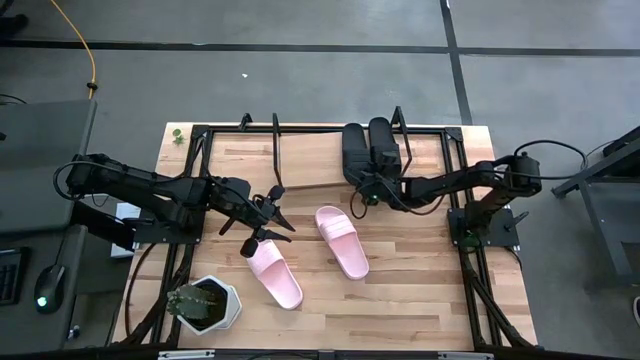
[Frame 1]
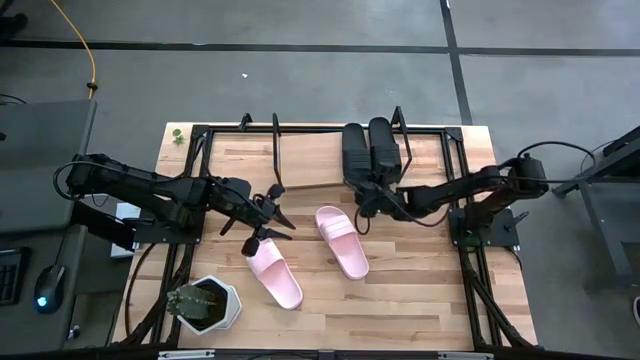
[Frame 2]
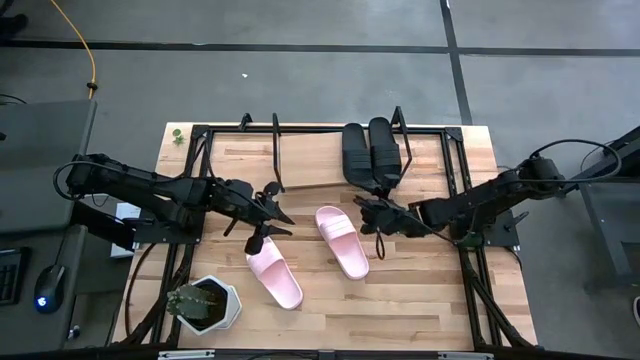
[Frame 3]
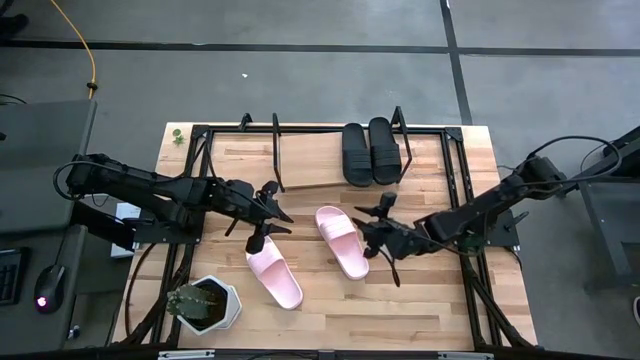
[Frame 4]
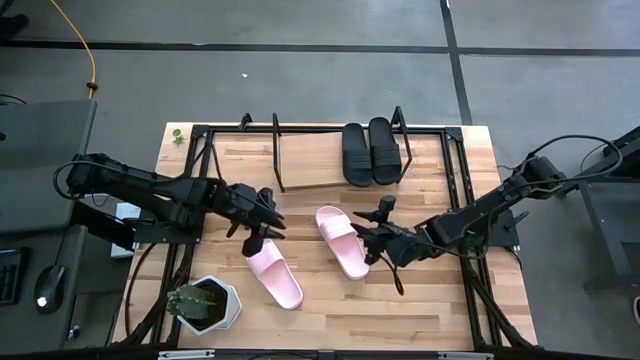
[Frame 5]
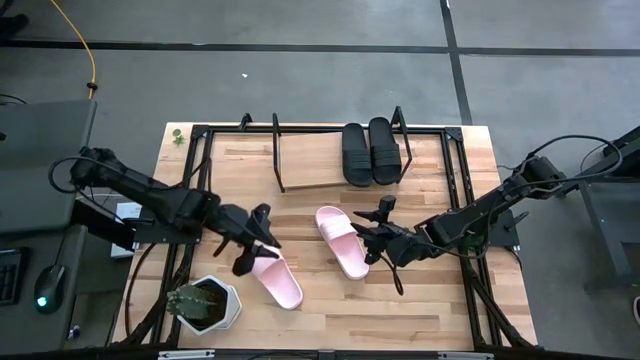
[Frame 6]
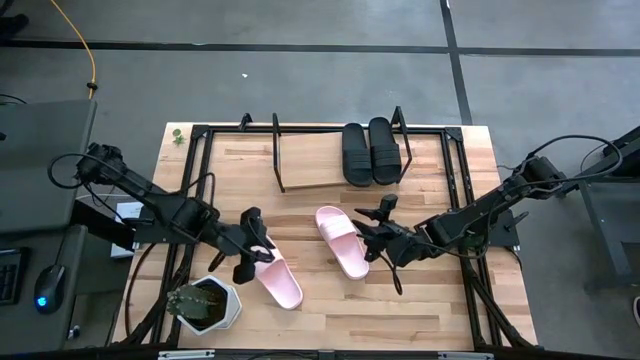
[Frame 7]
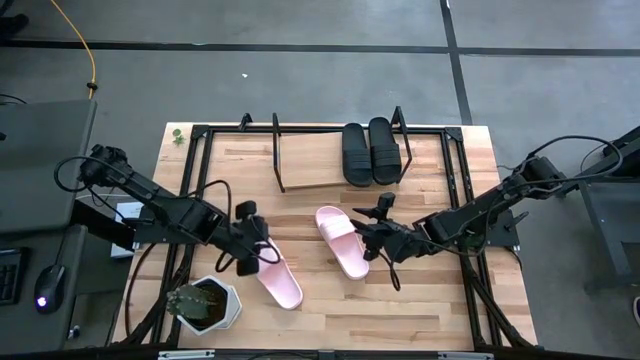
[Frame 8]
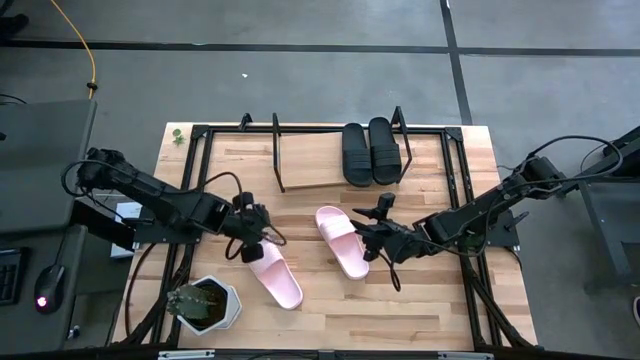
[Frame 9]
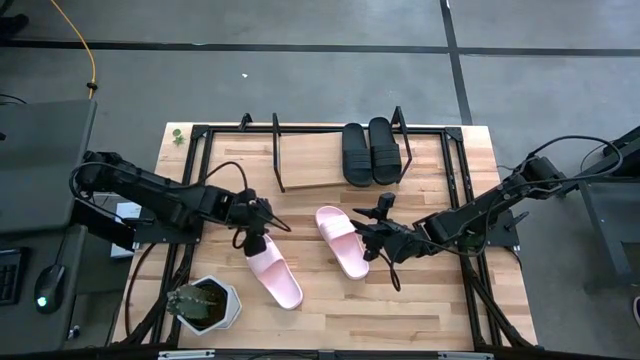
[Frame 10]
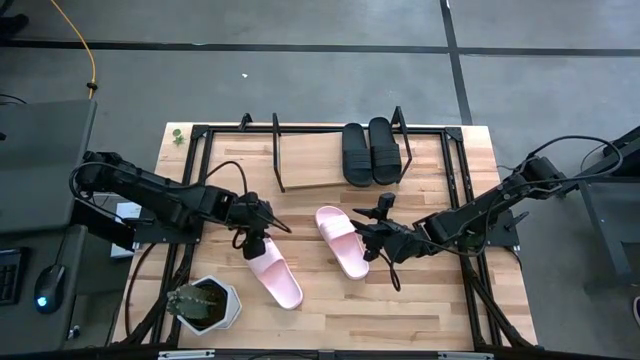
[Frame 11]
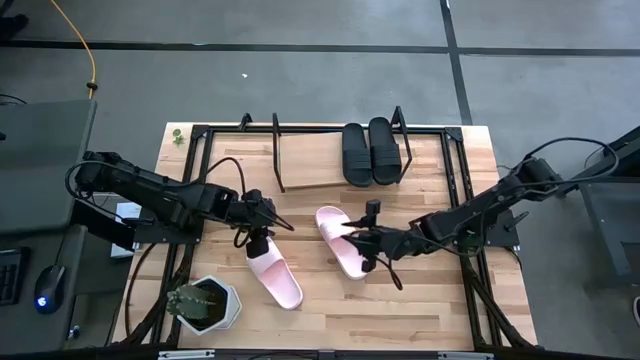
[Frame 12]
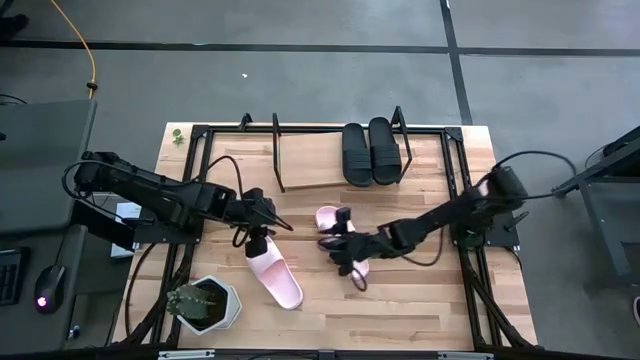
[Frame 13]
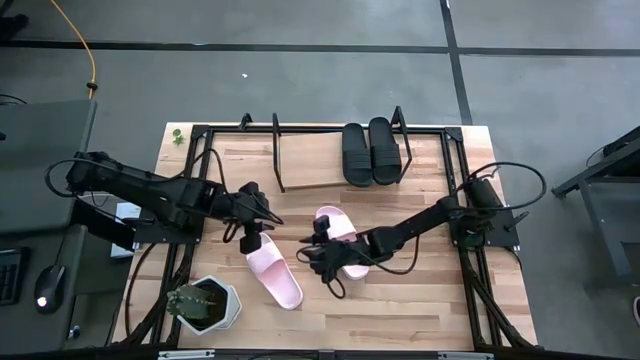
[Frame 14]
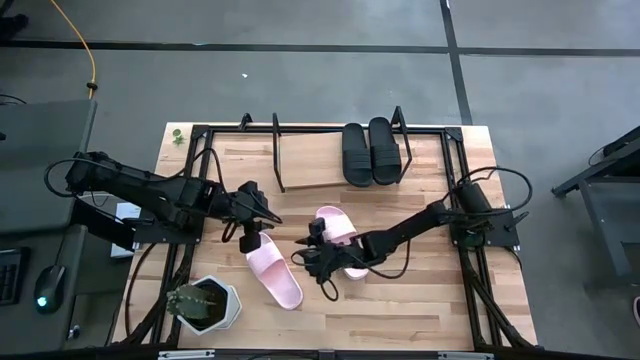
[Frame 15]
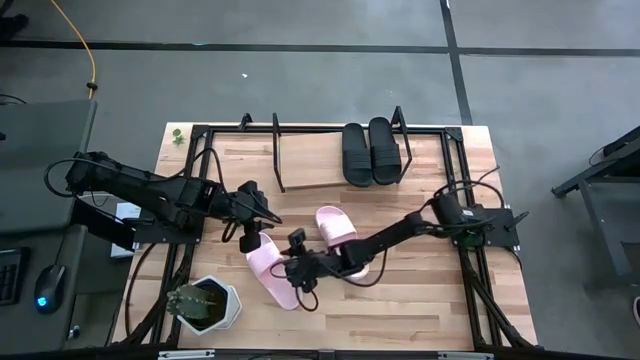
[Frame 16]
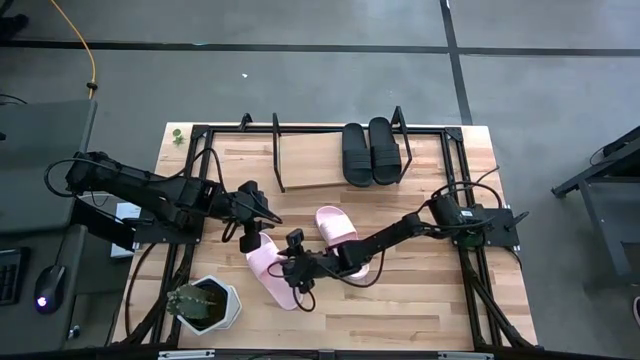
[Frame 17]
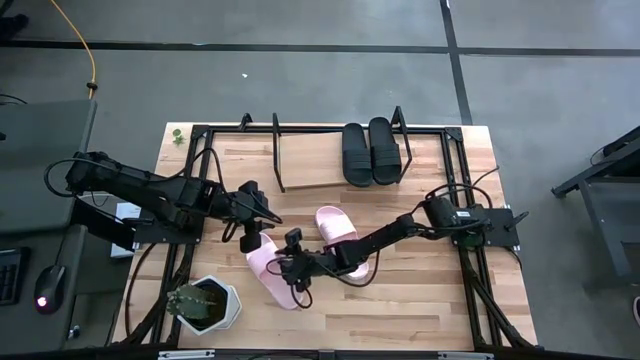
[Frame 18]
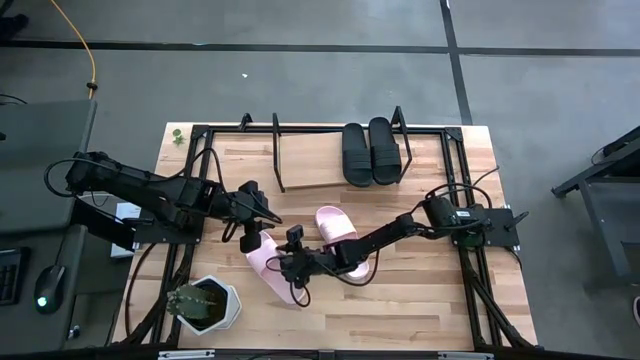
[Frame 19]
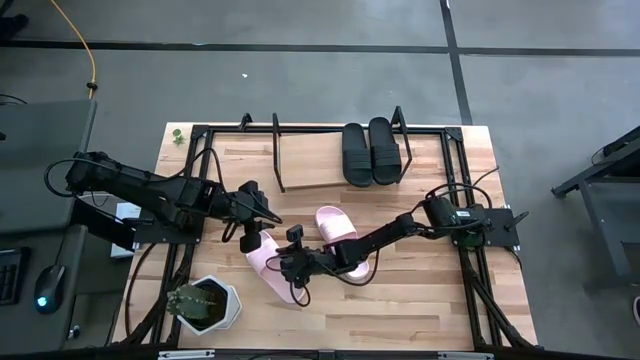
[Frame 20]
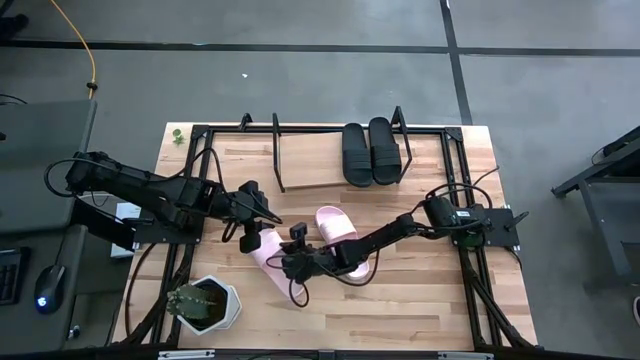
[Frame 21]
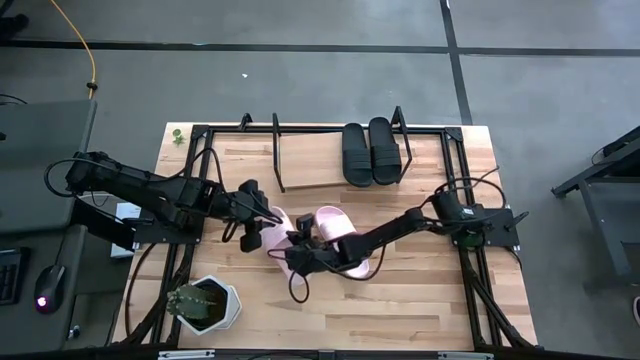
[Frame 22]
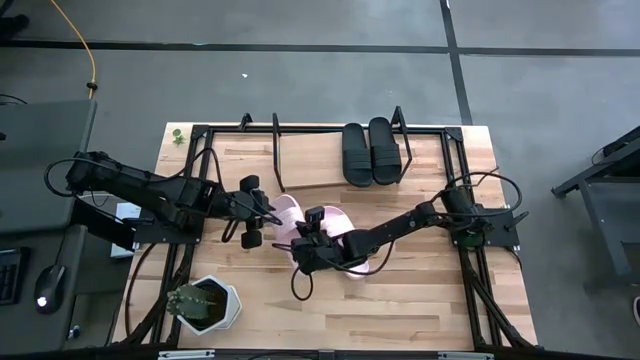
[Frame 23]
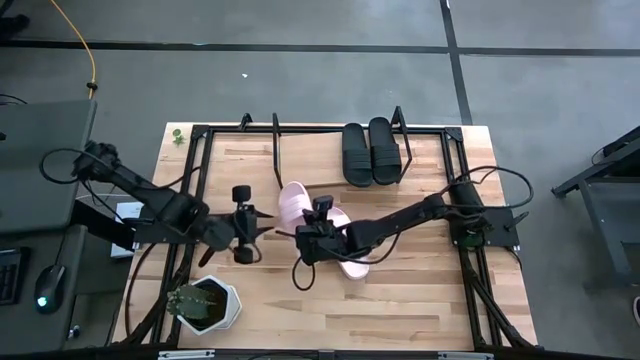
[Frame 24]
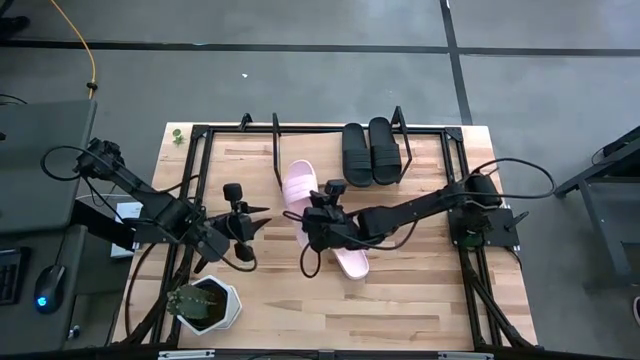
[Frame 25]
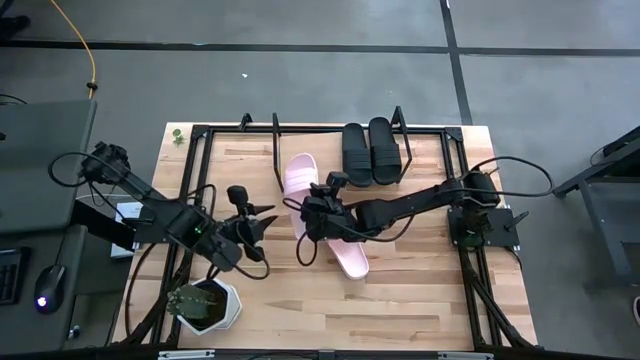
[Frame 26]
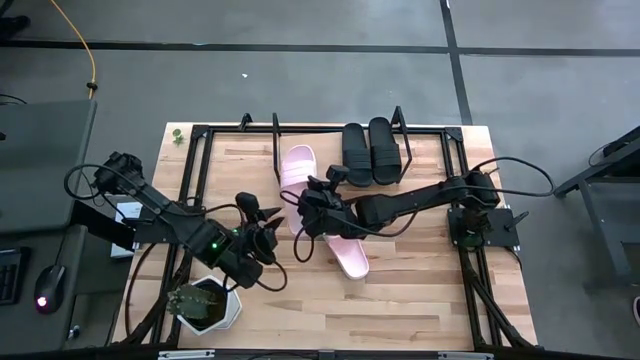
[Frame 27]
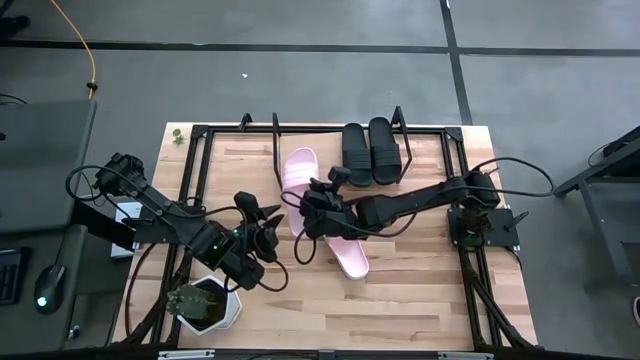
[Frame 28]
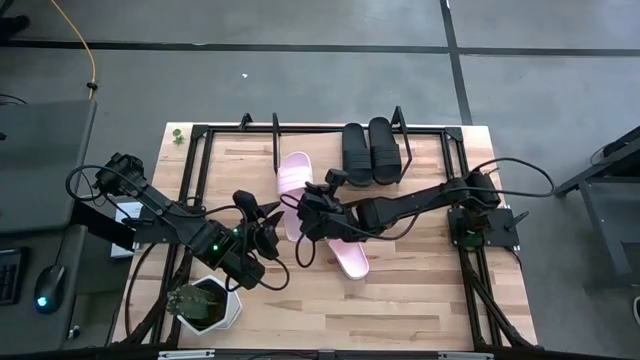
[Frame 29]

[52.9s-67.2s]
Task: Pick and place slides into the shelf
Put the left pink slide on the shelf

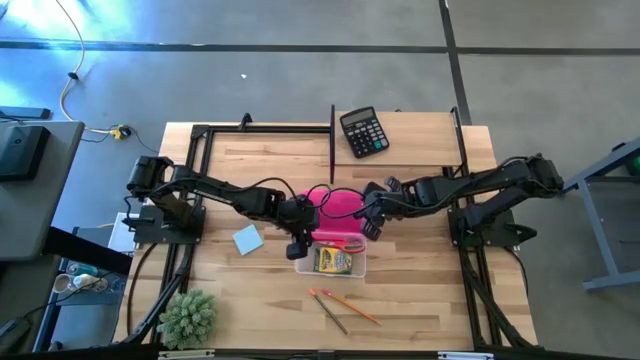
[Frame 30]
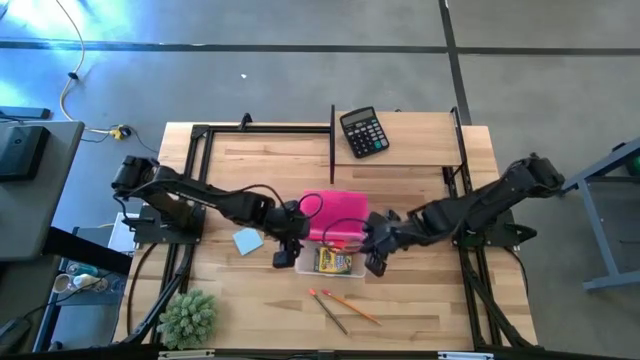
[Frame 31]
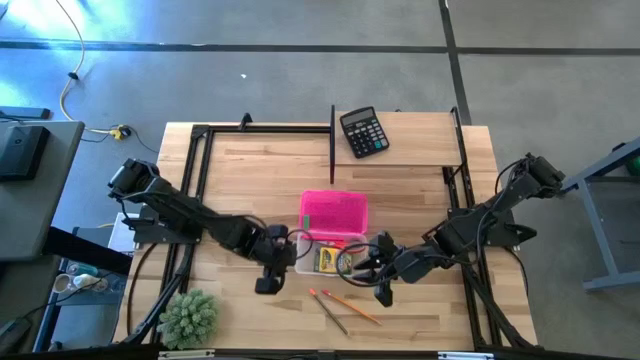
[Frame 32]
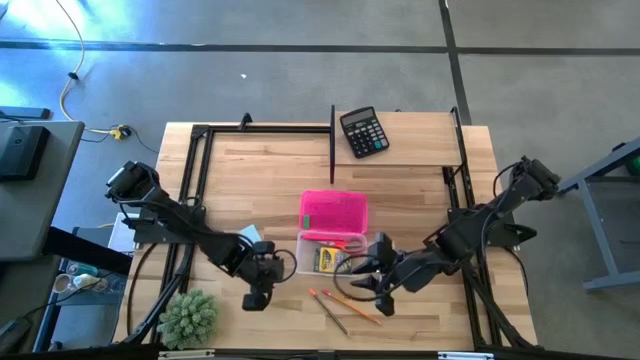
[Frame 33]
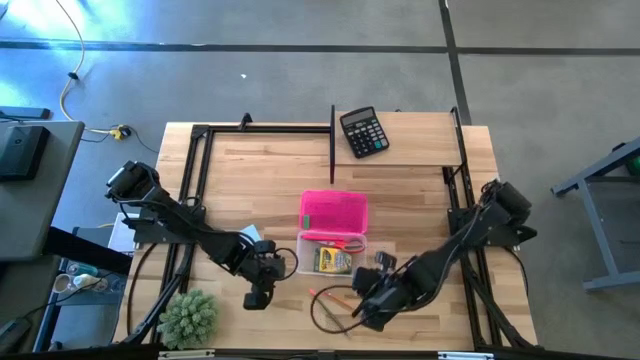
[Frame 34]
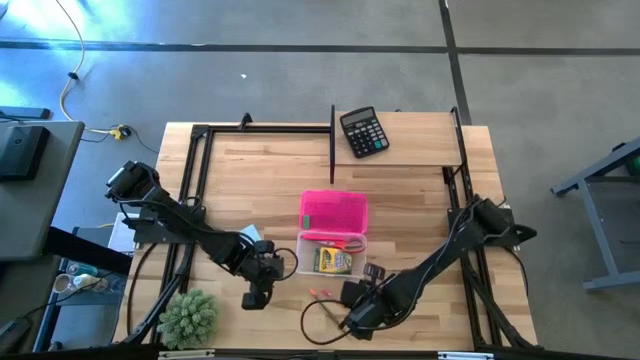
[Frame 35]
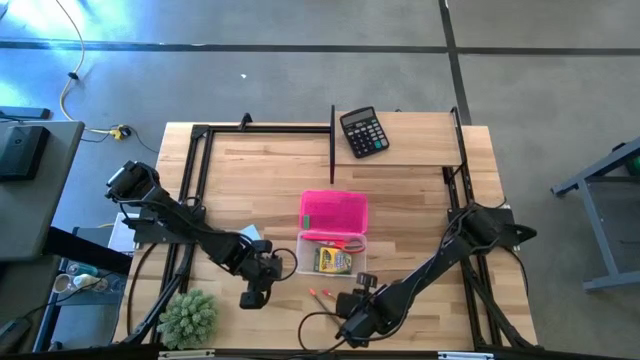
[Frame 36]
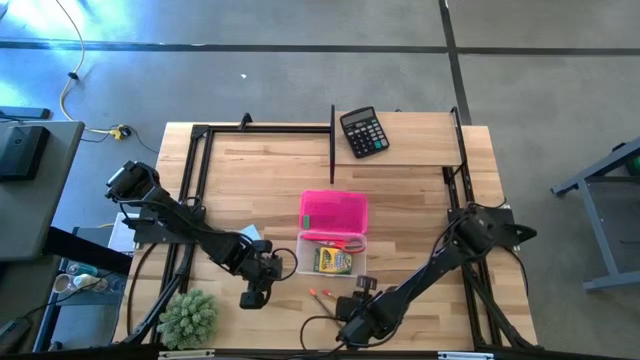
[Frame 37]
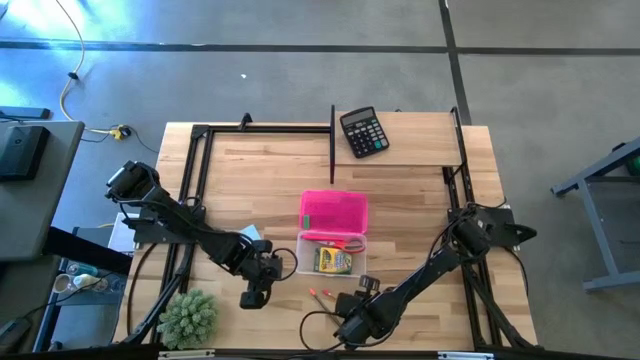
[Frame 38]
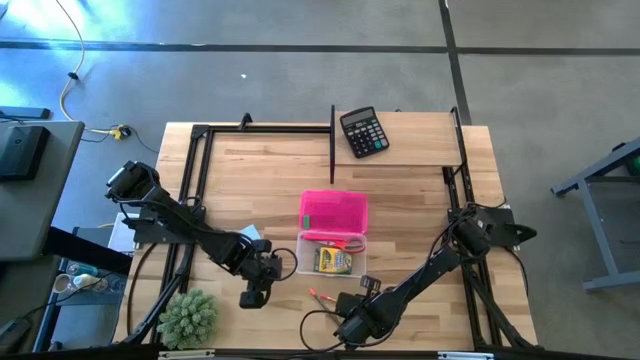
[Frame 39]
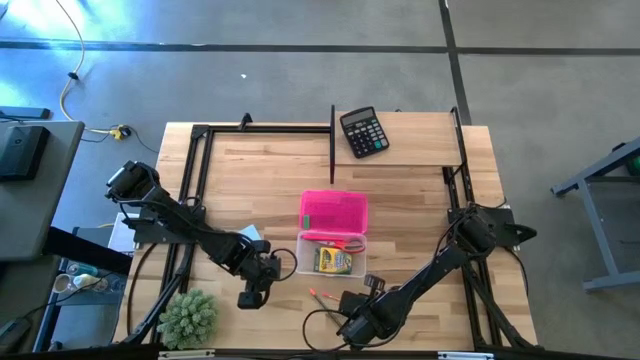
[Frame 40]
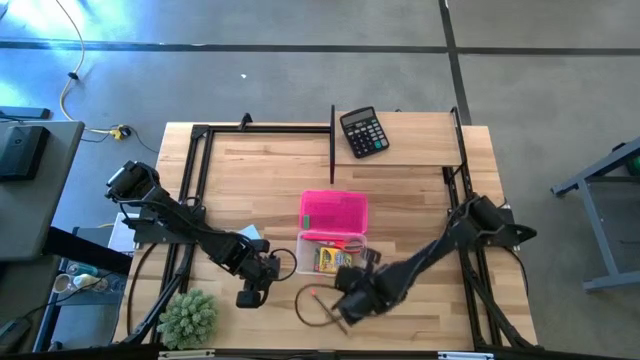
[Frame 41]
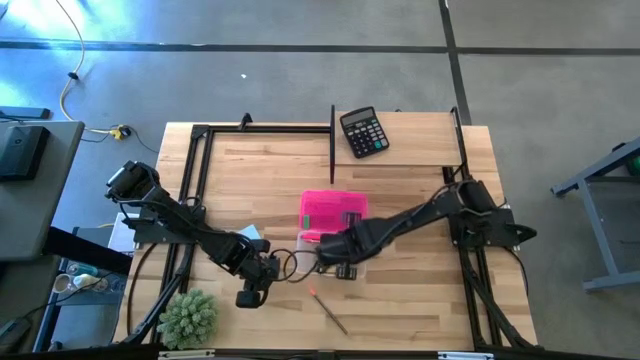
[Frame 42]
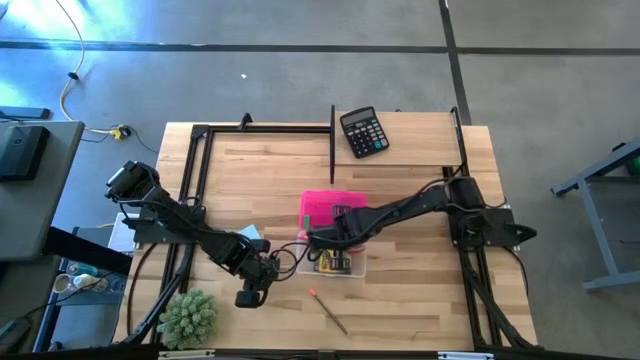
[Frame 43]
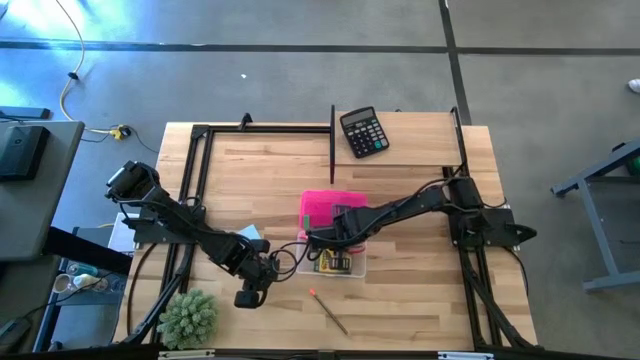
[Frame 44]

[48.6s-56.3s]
Task: Pack school essentials
Put the orange pencil into the pink supply box
